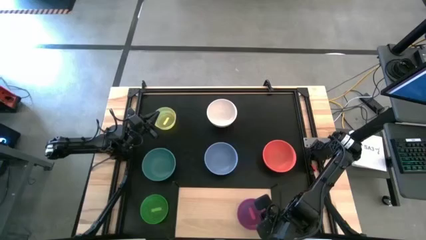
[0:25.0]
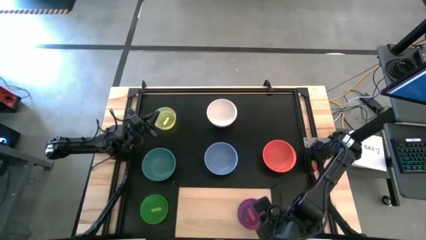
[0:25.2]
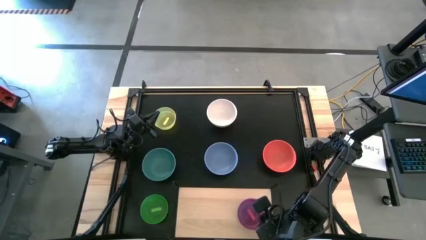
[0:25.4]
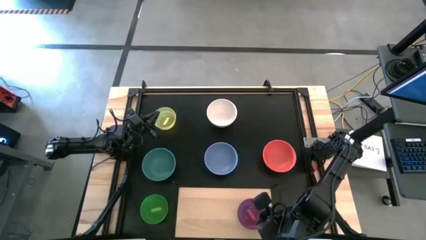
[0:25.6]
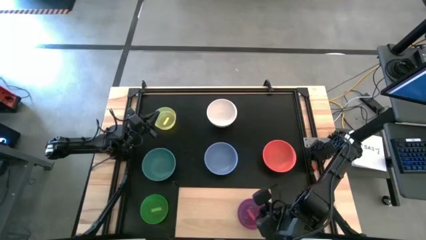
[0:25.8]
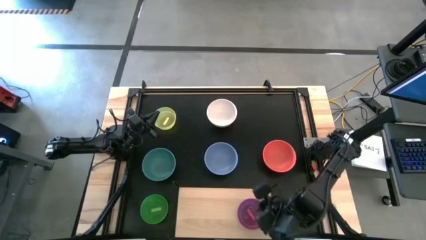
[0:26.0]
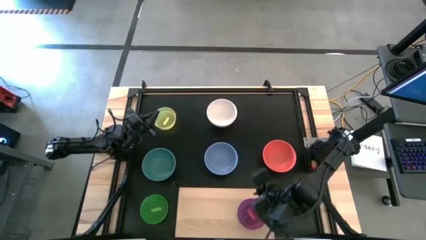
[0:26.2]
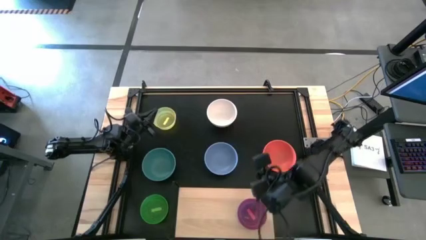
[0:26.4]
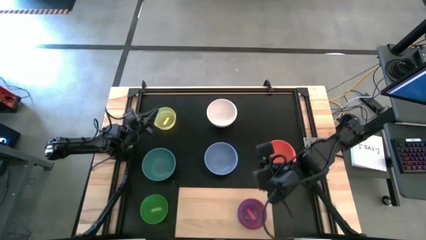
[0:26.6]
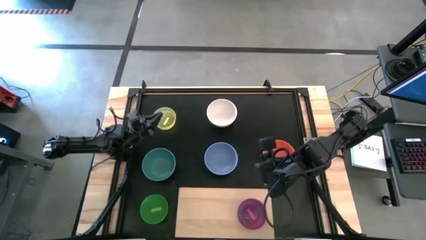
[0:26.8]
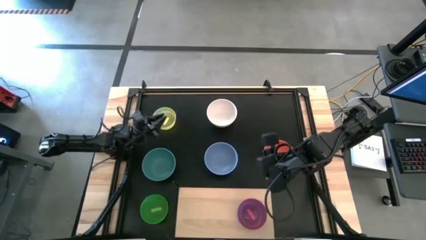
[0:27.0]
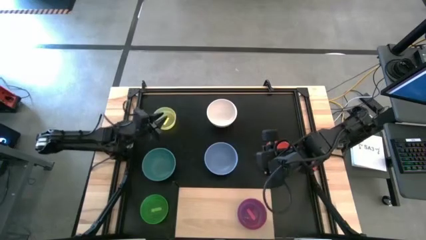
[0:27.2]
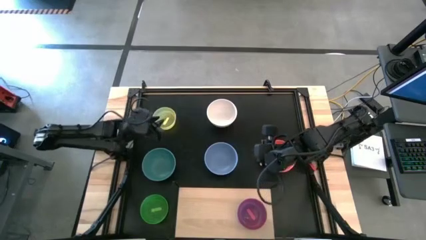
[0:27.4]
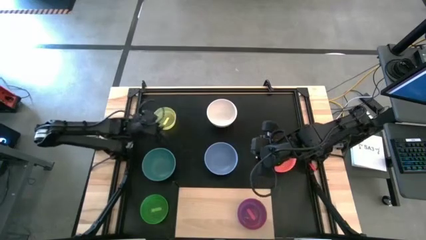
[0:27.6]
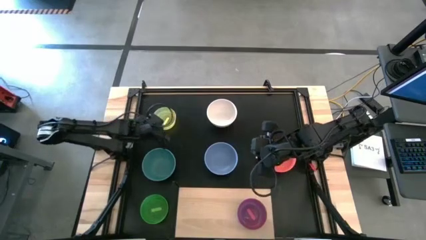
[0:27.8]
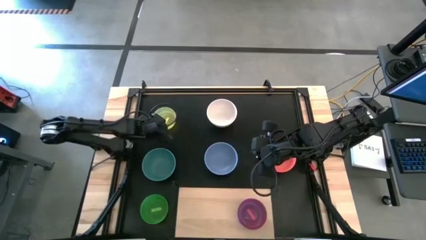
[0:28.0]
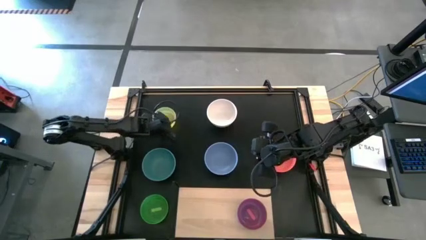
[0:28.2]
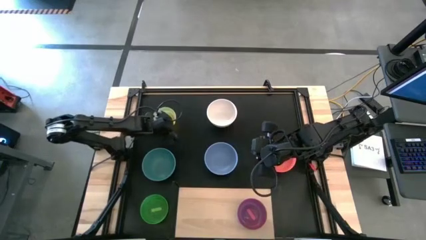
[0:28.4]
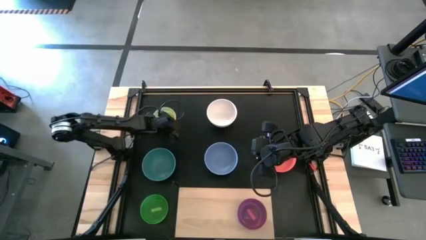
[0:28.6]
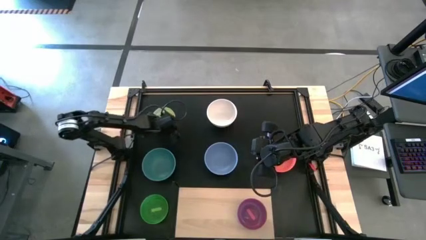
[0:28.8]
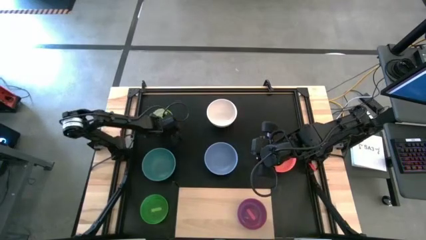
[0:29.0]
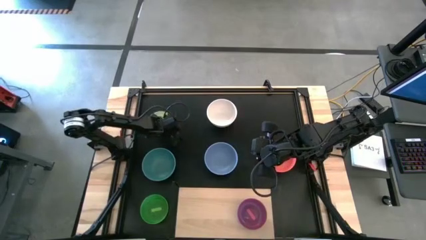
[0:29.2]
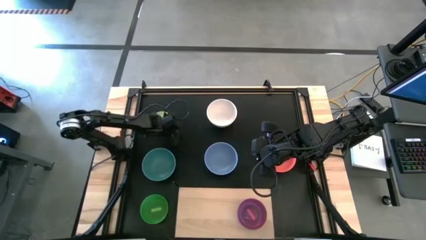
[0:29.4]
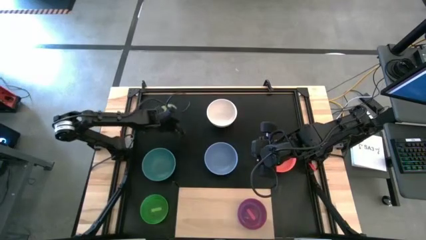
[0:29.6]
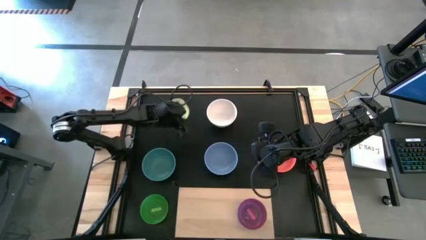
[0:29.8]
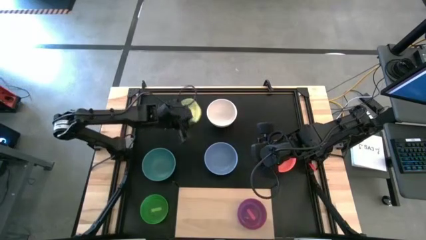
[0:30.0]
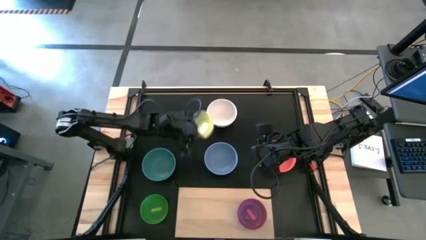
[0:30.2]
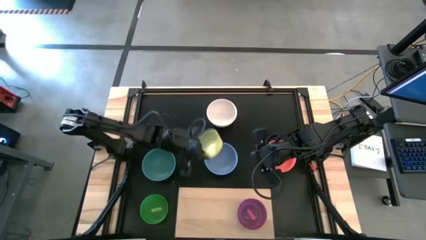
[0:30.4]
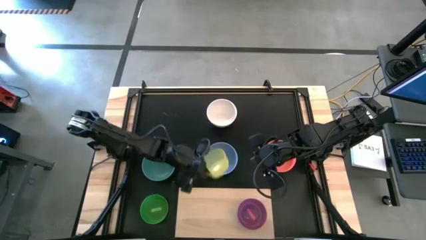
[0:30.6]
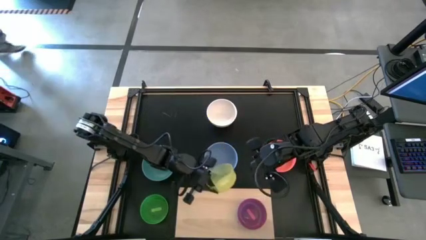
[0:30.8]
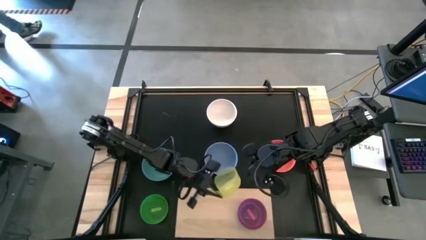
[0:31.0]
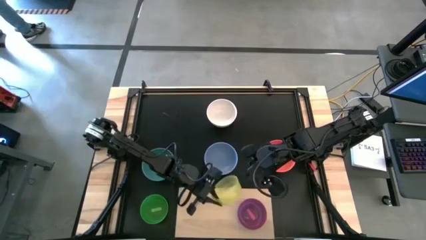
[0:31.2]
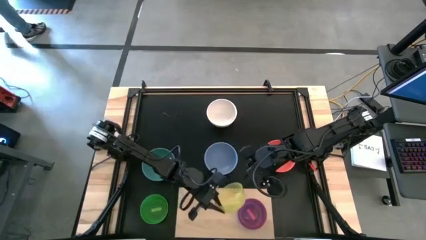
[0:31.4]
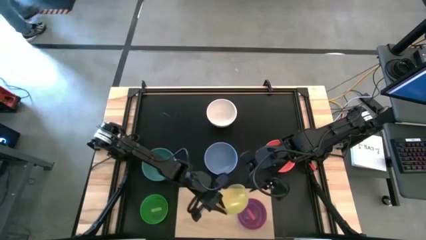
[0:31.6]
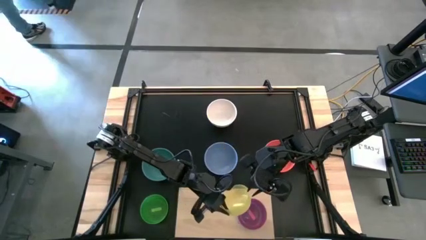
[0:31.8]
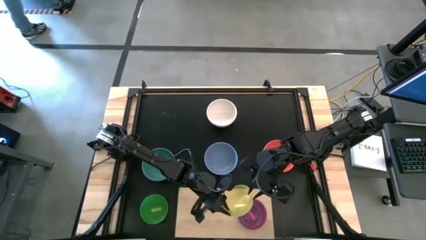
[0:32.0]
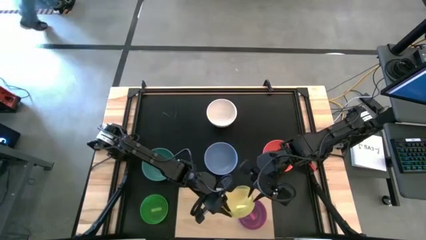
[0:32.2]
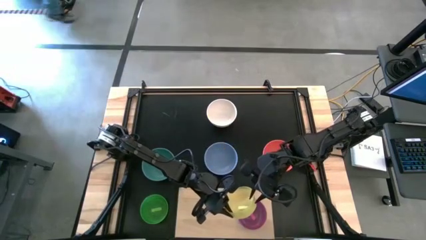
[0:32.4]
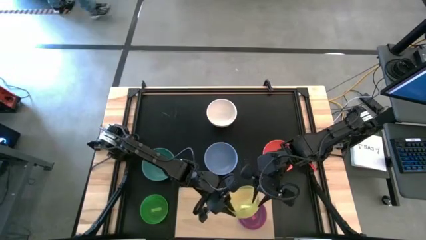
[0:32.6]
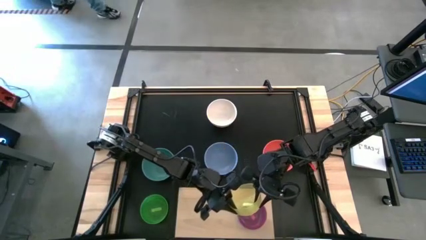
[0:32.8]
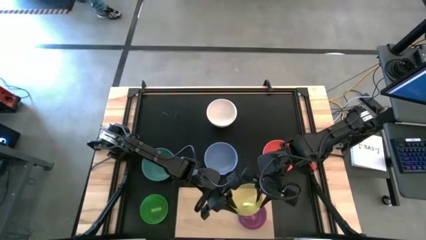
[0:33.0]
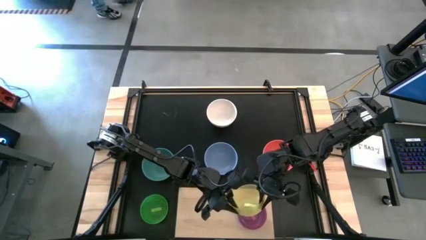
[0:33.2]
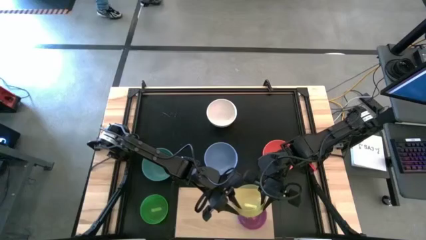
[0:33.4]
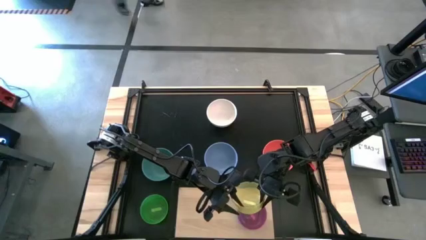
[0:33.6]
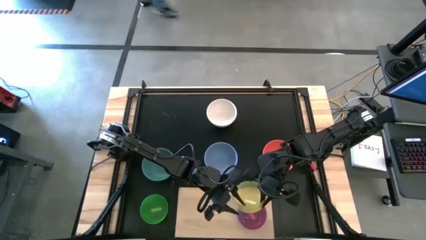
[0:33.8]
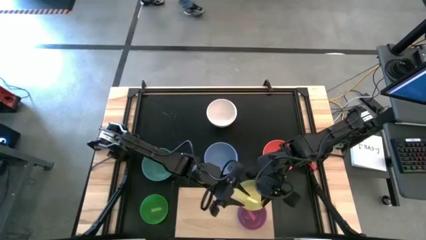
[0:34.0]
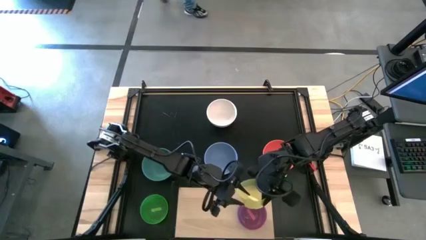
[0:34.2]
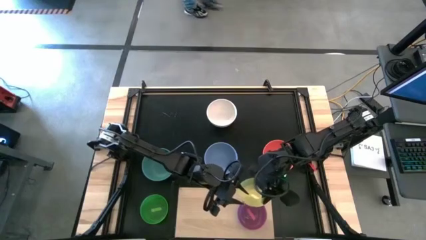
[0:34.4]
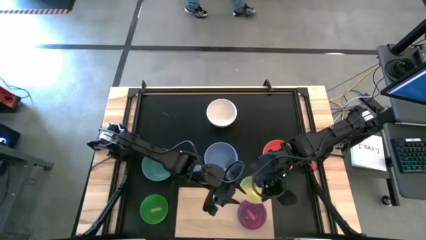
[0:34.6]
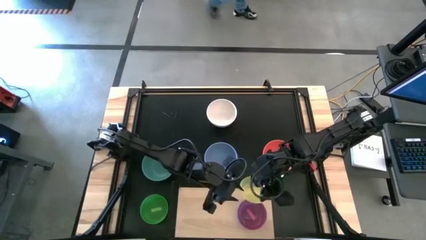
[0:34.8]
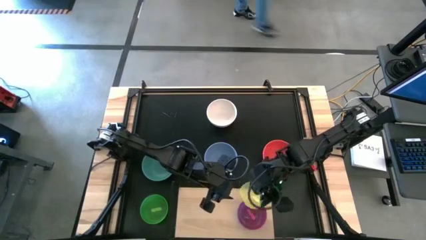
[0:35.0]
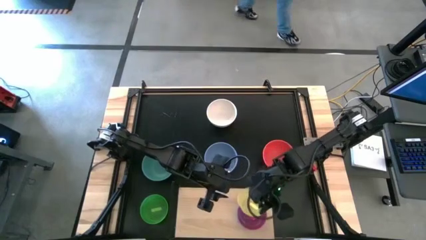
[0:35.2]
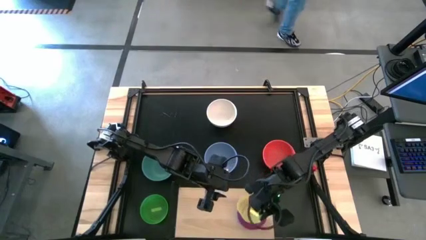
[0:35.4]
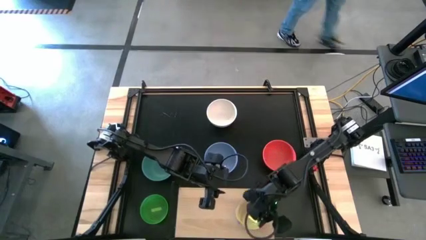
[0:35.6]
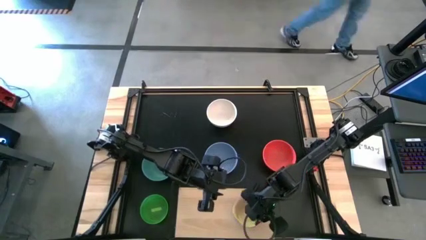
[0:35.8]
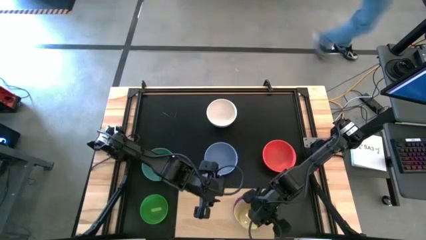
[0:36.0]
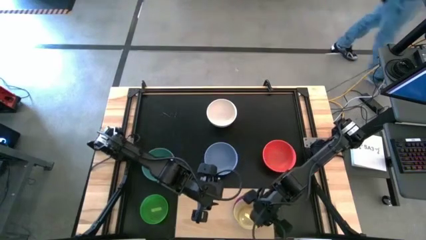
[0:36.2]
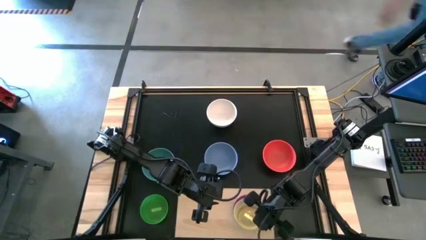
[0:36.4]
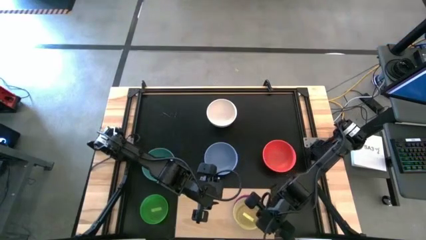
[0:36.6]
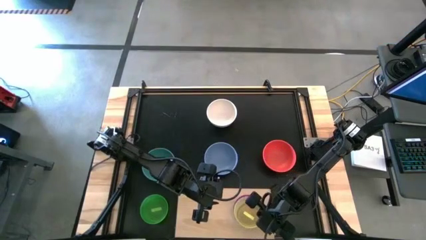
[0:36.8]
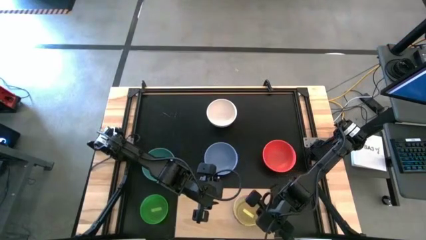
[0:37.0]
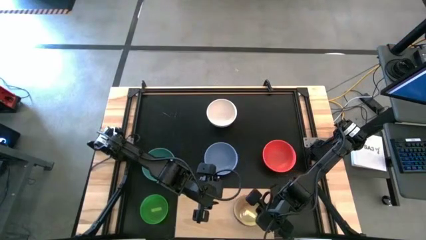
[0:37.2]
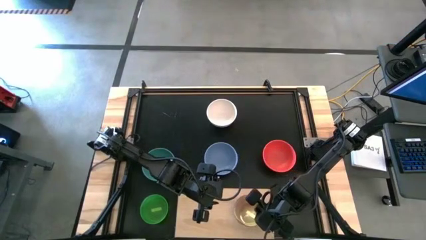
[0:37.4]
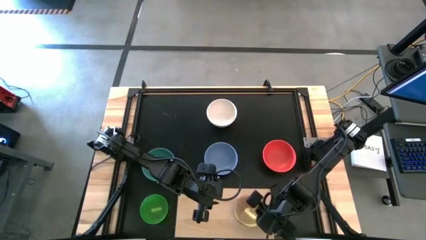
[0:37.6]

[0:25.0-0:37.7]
Task: Place and stack bowls onto a shelf
Stack the small yellow bowl on top of the small pink bowl on the shelf

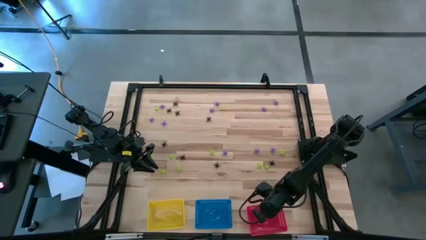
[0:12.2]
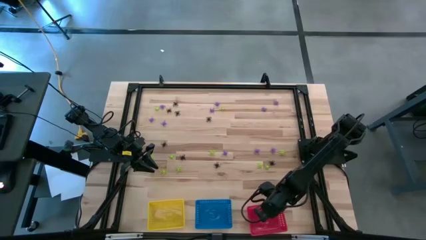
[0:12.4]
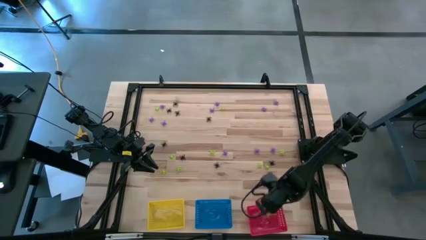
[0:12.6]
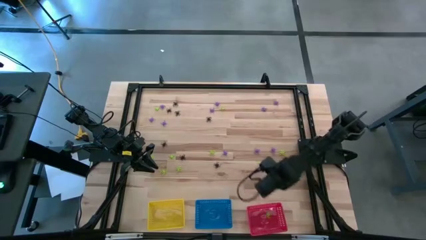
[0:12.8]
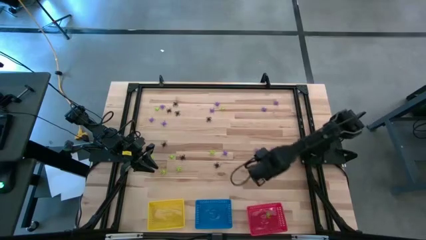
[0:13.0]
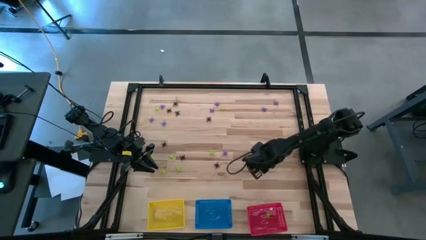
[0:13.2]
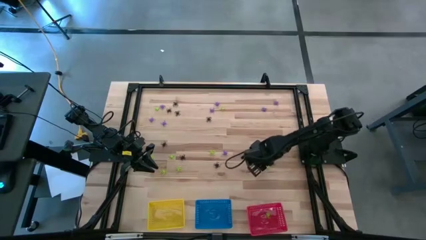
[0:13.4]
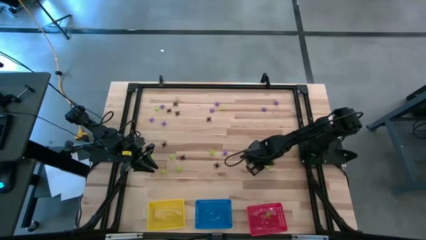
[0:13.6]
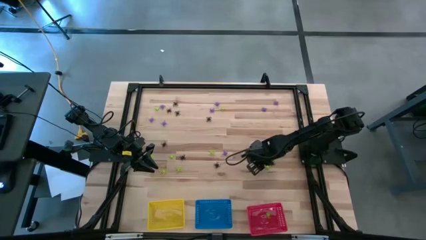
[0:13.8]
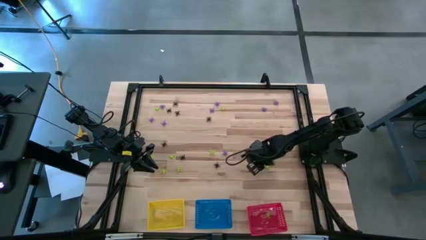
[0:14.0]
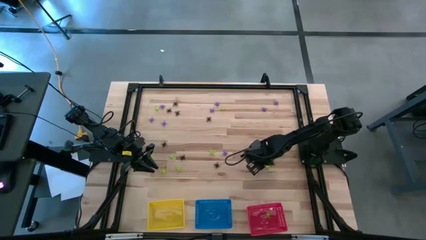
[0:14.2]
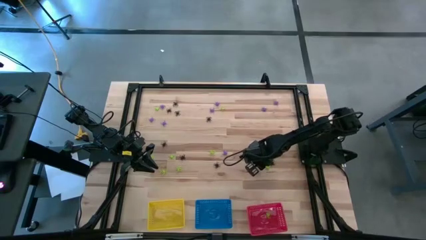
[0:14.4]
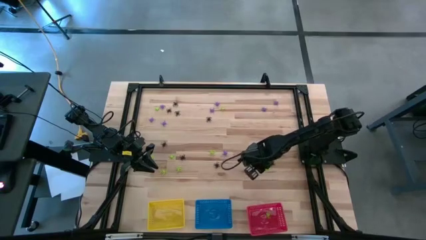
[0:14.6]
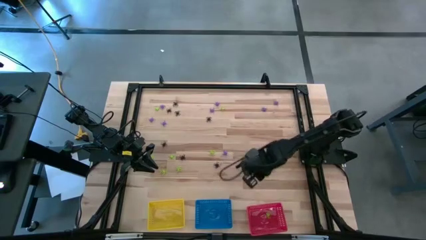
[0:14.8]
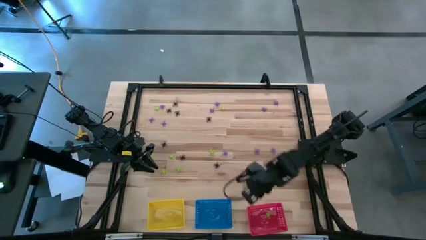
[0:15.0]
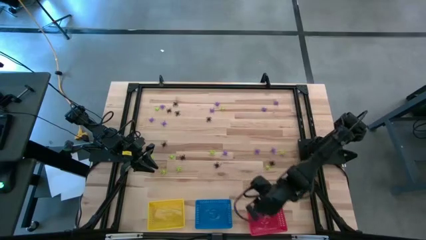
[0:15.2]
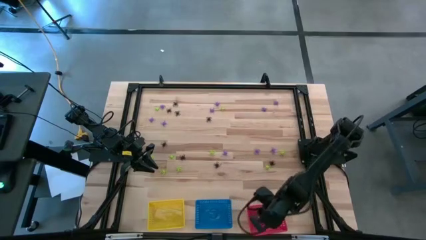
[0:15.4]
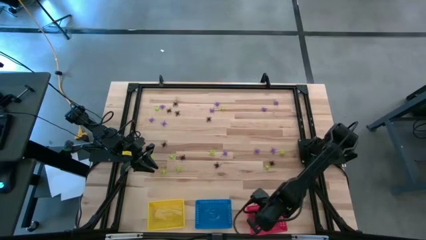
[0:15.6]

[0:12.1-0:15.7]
Task: Sort Halloween decoration
Put the green spider toy into the red bin

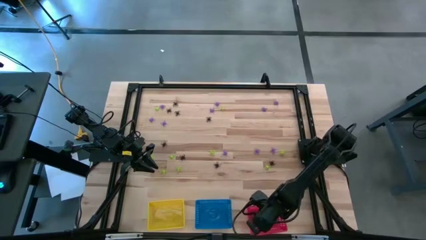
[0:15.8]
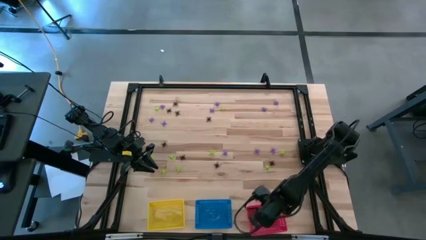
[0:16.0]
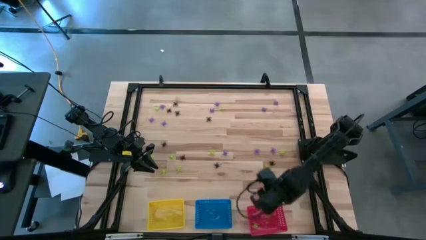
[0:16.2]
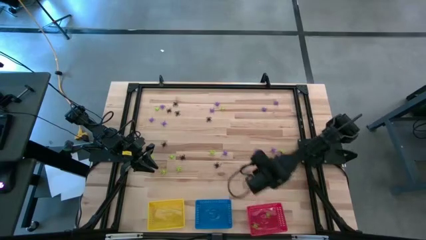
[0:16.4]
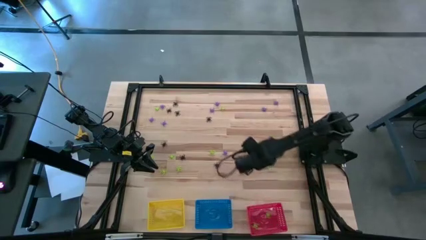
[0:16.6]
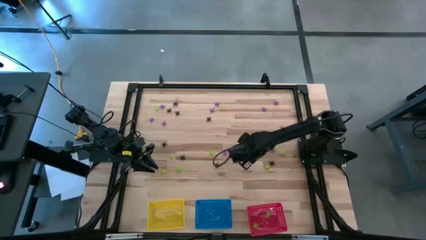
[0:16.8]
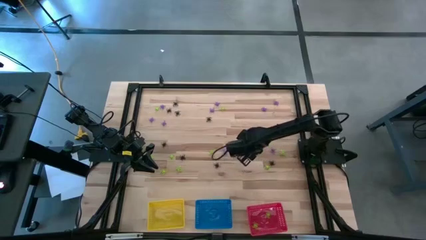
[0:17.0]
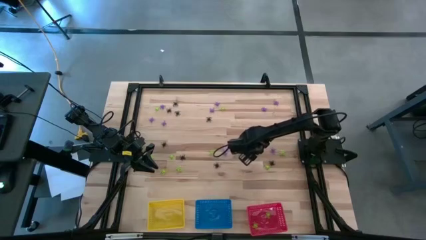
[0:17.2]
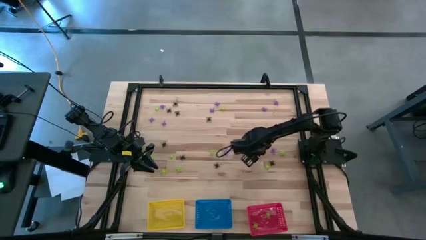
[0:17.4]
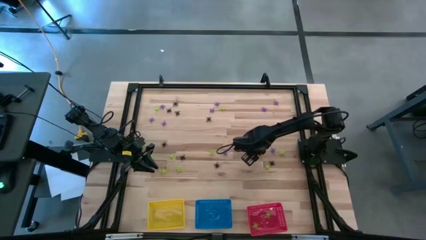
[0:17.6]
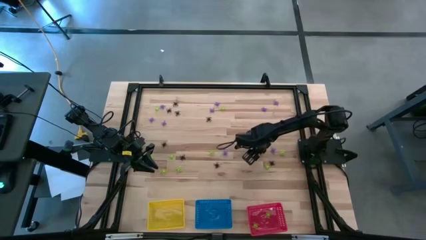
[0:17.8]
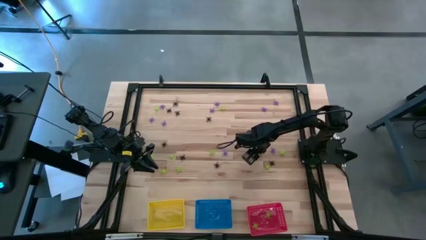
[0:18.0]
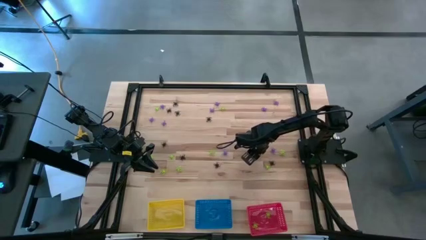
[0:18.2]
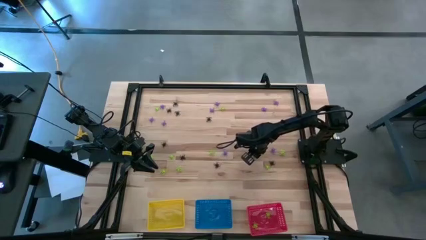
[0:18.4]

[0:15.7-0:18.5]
Put the violet spider toy into the blue bin
